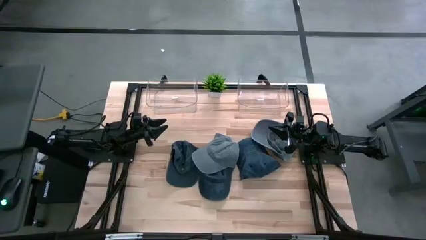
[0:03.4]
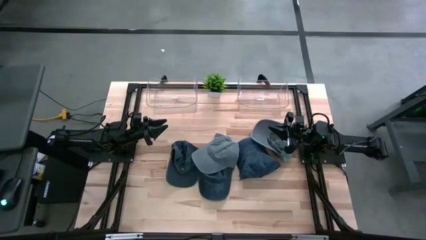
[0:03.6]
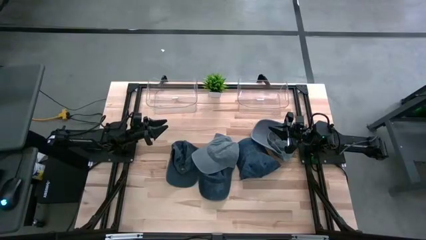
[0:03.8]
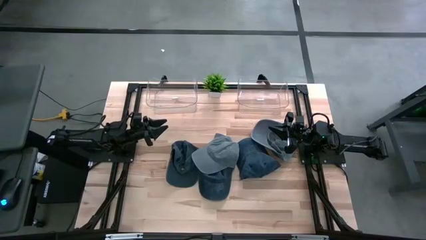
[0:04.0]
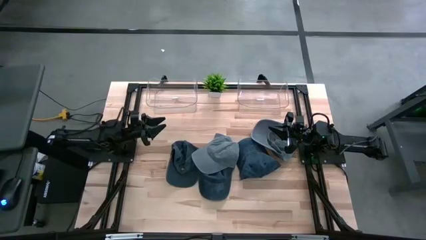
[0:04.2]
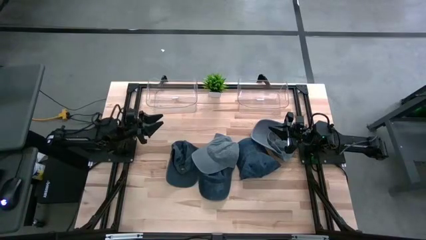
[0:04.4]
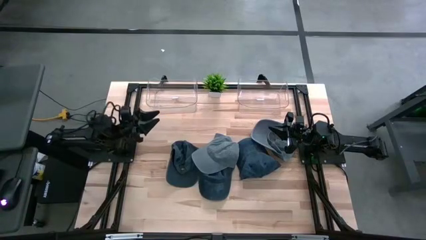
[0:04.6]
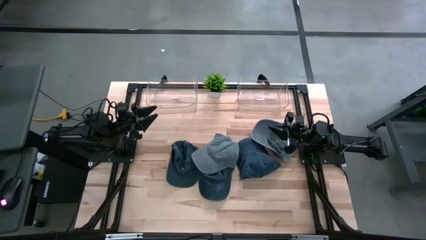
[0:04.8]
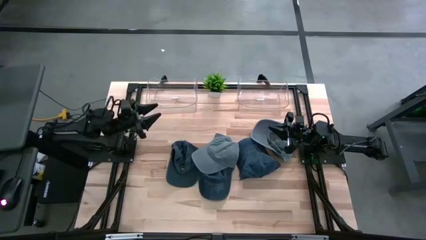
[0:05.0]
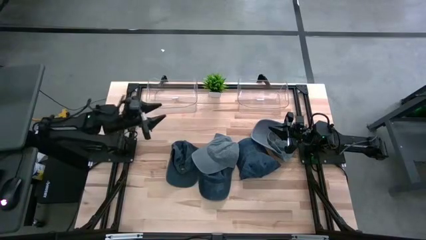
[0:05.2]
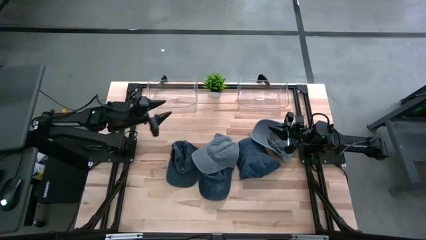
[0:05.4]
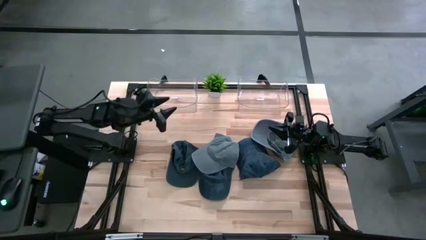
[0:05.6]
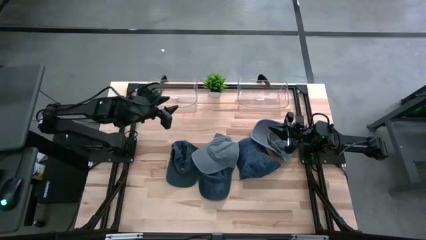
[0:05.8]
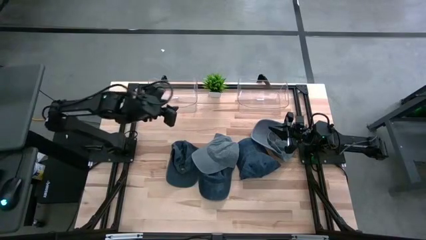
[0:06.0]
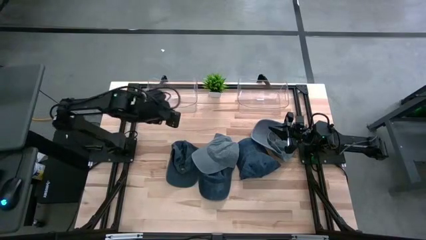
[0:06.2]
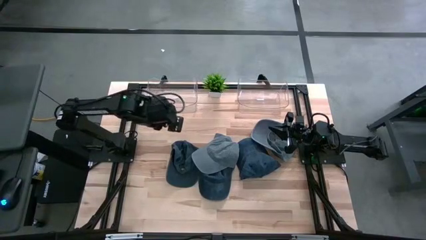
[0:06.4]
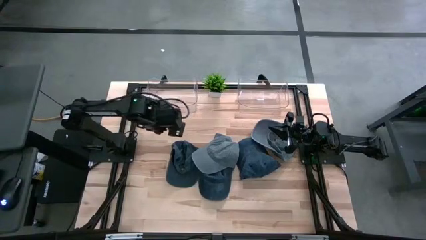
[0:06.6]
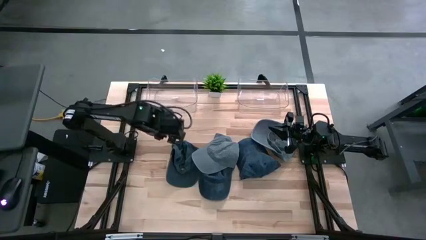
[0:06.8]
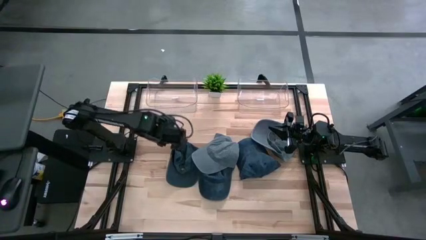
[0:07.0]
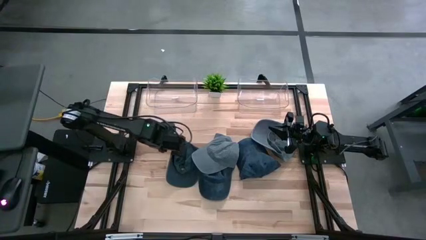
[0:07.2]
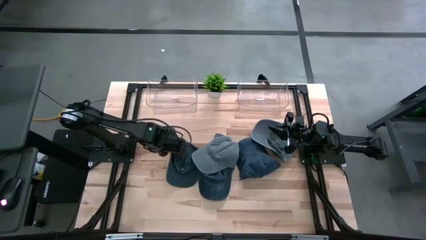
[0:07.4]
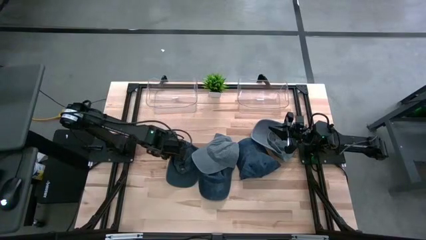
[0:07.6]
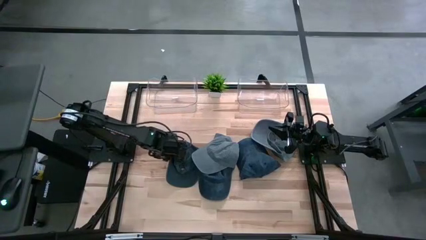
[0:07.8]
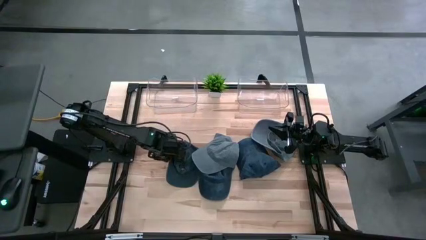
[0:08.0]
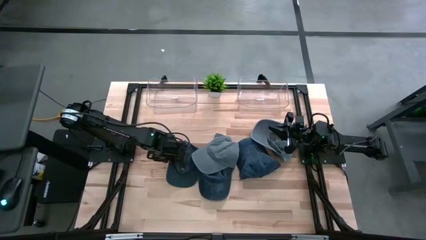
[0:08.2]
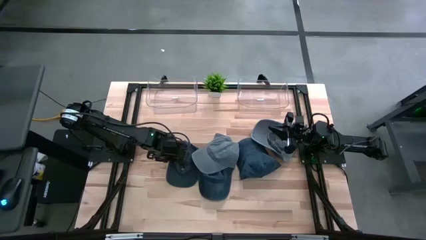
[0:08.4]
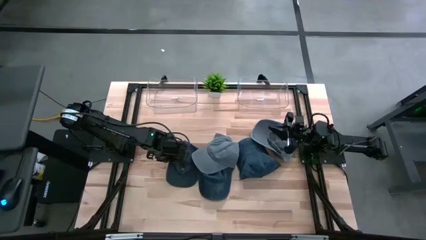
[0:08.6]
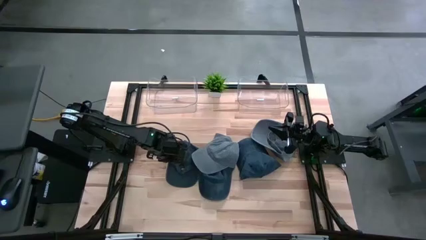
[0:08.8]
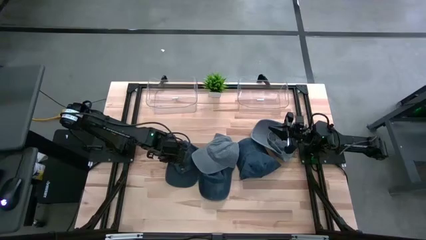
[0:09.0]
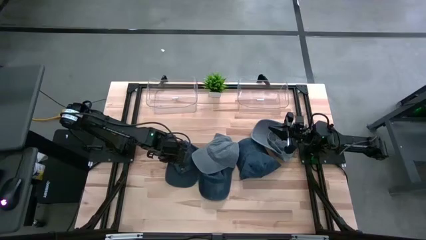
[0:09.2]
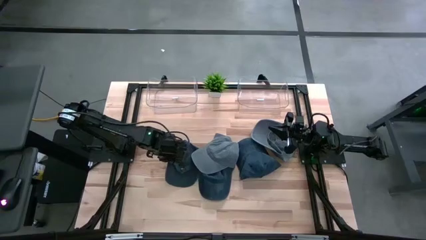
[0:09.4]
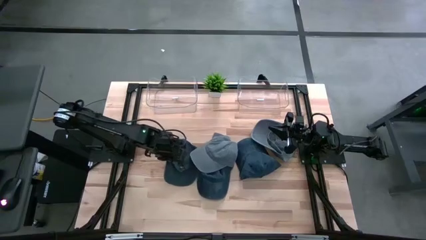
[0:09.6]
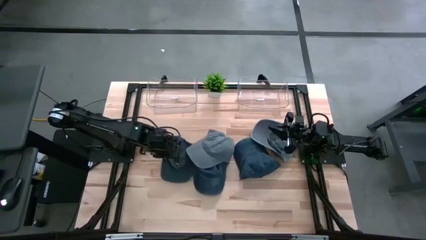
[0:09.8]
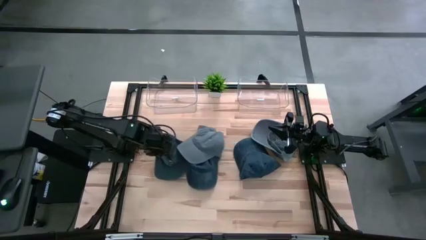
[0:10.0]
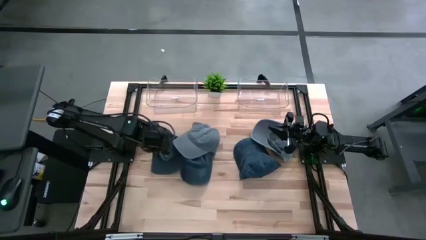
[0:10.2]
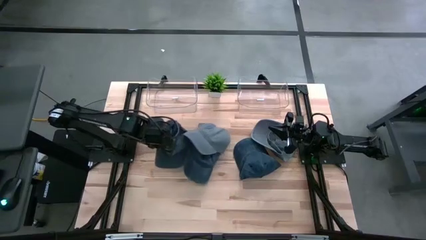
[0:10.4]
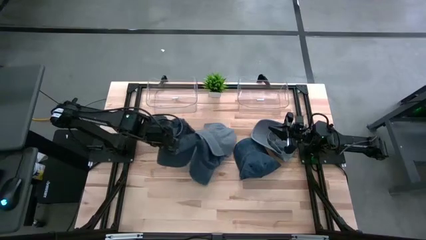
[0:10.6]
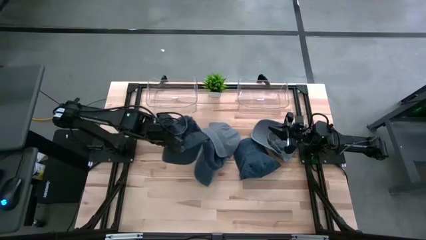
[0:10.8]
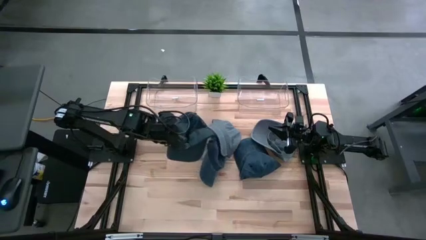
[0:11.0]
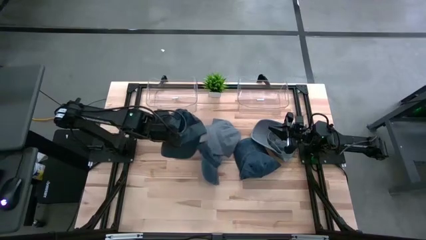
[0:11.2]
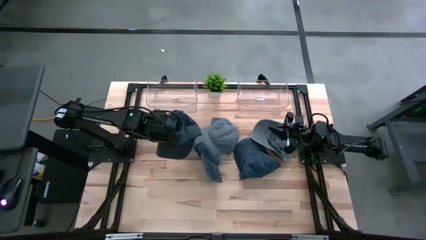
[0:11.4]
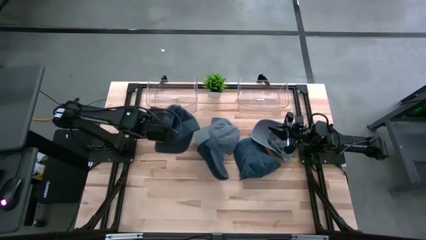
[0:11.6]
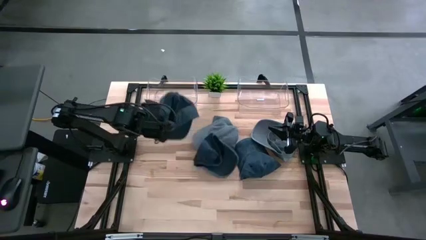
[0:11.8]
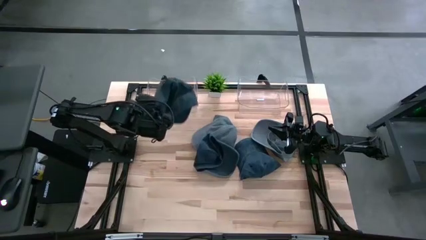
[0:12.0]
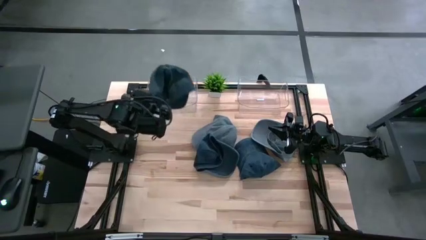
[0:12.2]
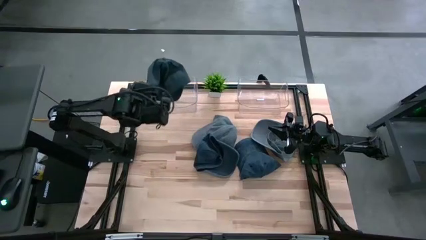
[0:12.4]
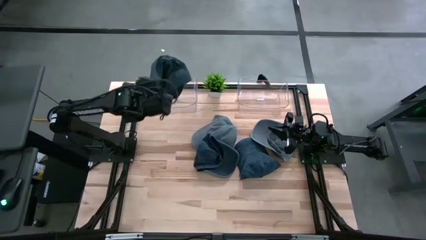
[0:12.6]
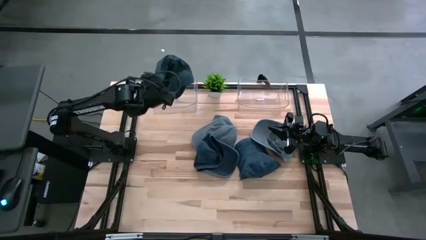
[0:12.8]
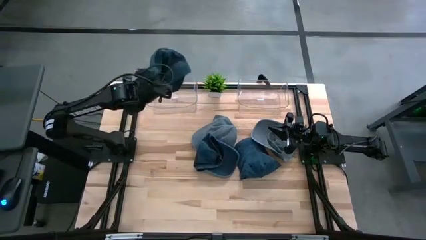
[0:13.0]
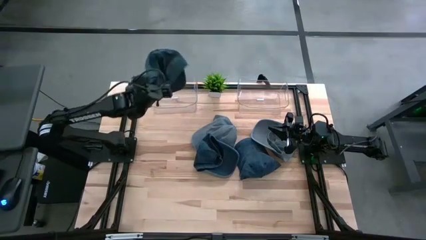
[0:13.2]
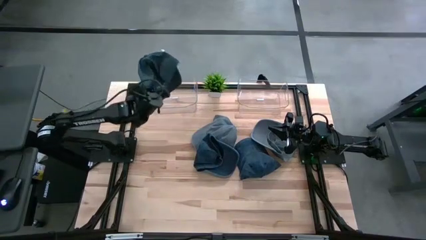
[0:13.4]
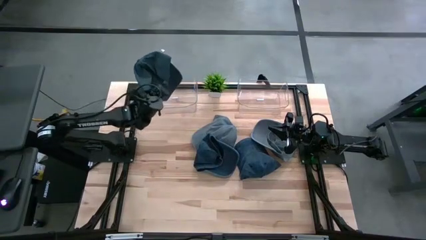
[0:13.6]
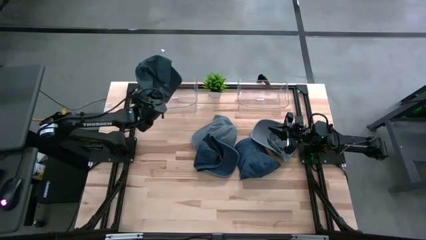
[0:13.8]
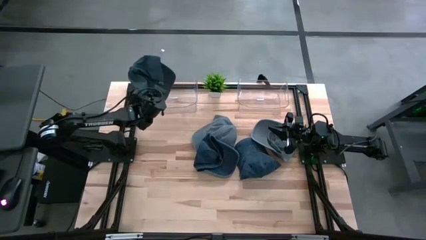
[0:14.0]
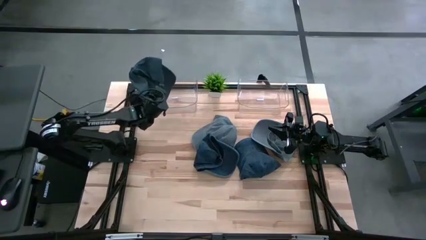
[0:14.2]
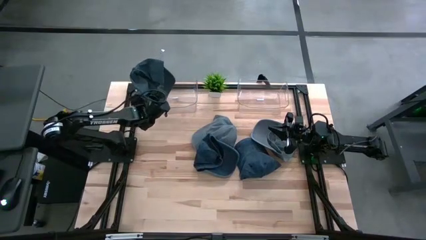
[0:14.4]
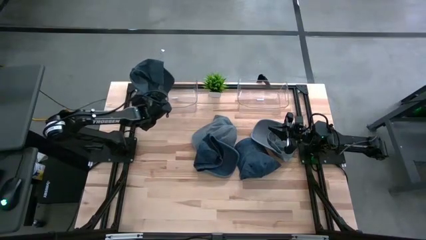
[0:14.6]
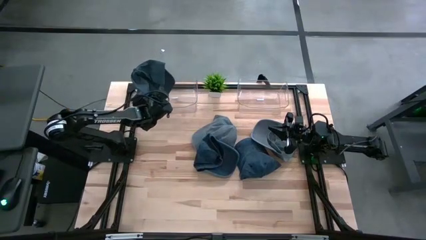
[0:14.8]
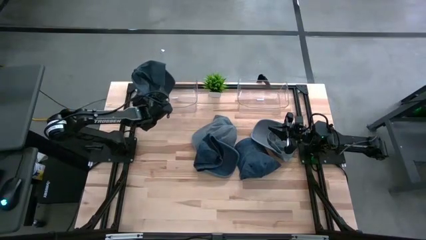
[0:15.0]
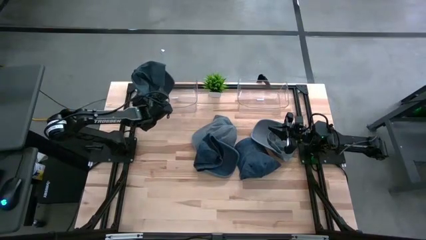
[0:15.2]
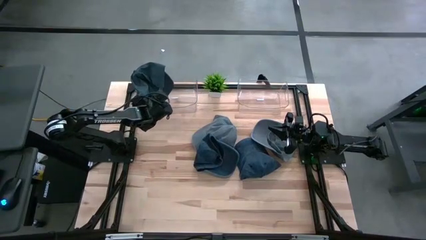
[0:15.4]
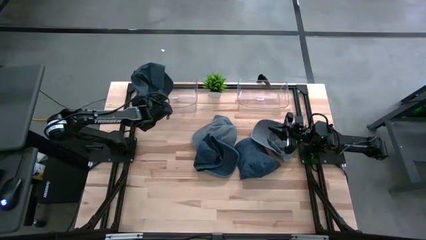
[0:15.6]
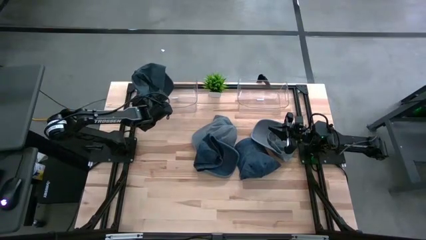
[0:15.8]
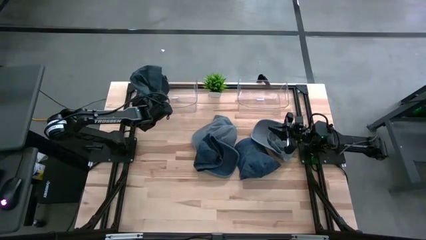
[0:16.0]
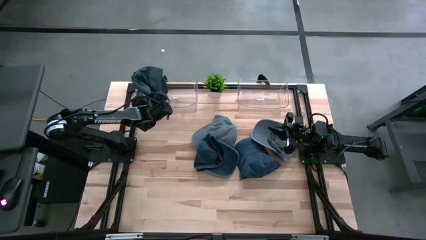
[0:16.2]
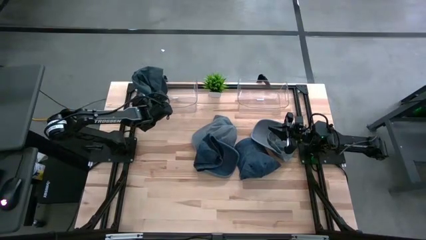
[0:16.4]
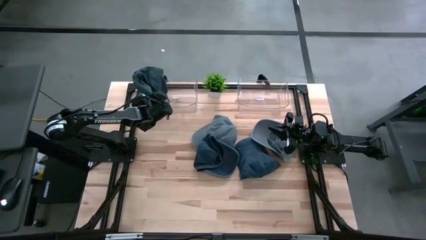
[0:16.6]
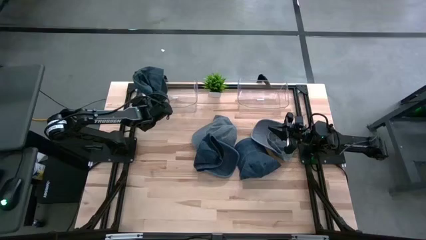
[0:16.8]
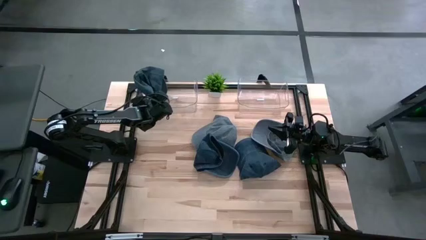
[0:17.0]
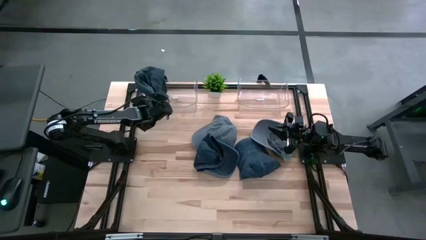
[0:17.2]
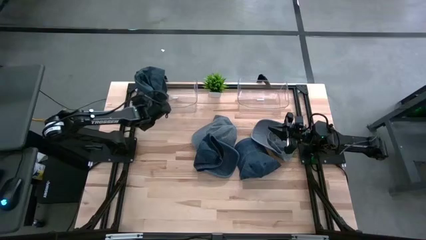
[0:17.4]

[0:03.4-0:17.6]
Task: Pick & Place hat
Put the left dark blue cap into the left transparent bin
